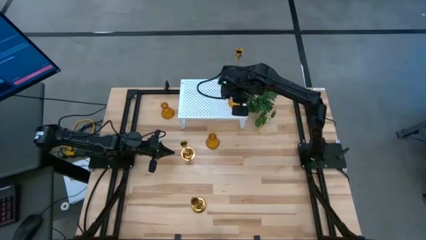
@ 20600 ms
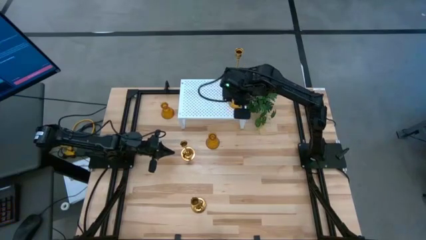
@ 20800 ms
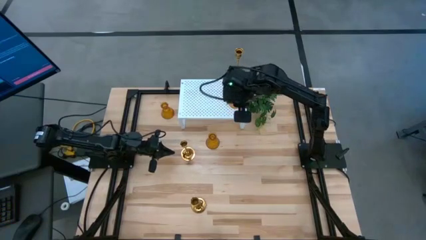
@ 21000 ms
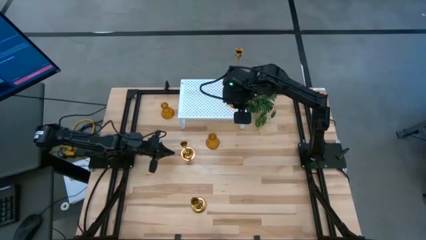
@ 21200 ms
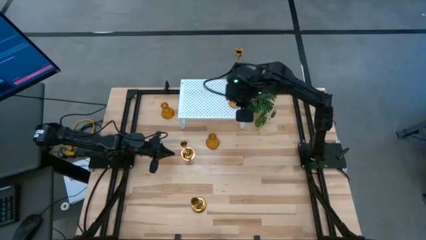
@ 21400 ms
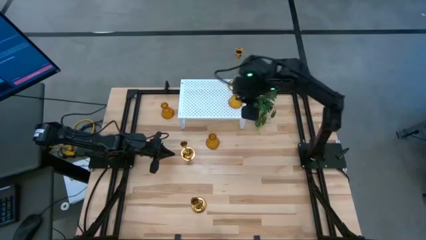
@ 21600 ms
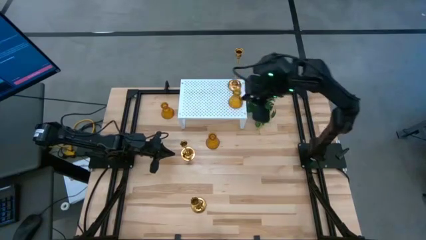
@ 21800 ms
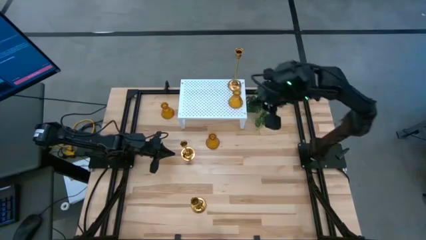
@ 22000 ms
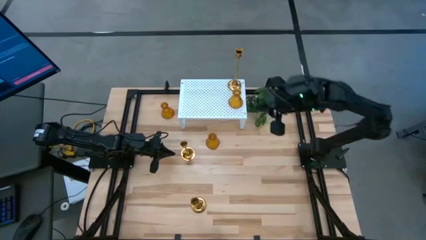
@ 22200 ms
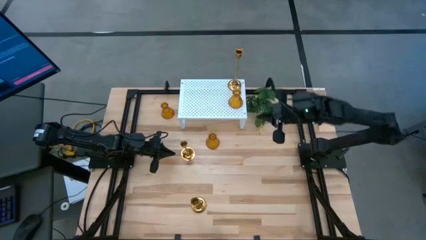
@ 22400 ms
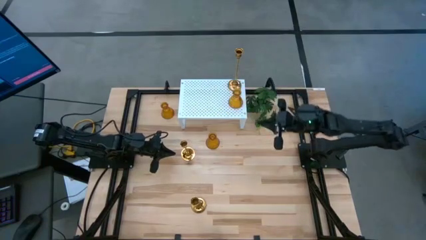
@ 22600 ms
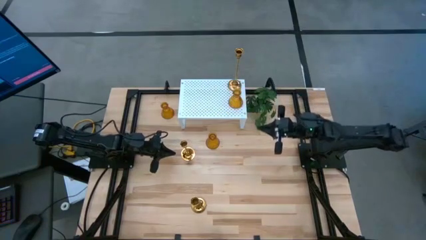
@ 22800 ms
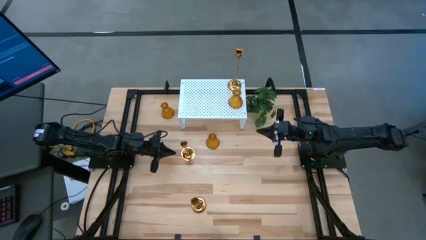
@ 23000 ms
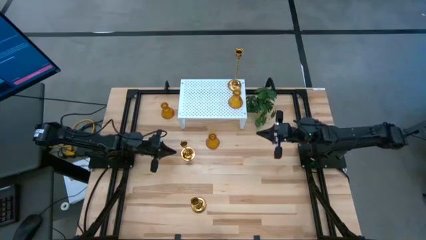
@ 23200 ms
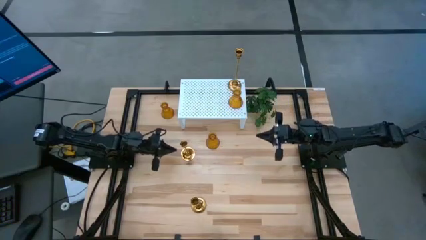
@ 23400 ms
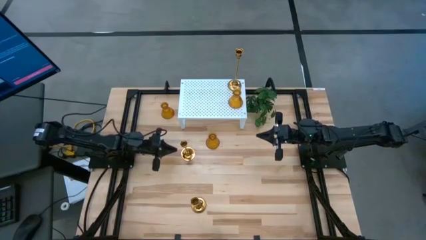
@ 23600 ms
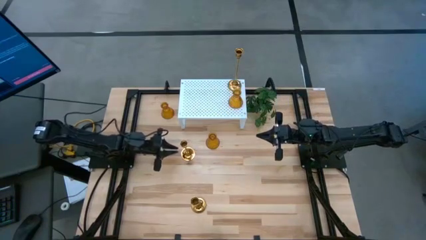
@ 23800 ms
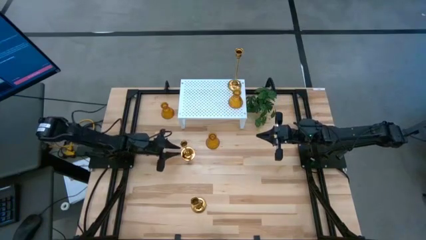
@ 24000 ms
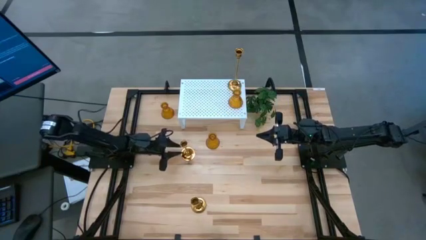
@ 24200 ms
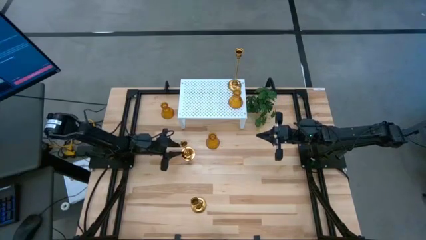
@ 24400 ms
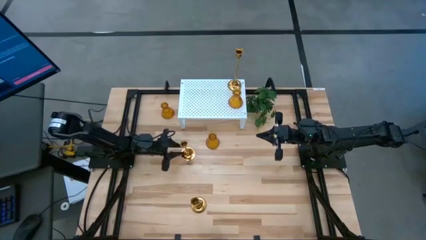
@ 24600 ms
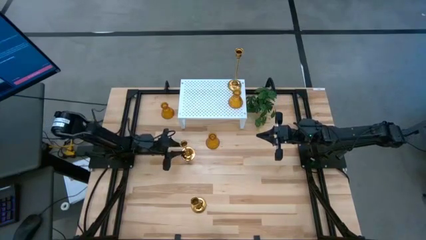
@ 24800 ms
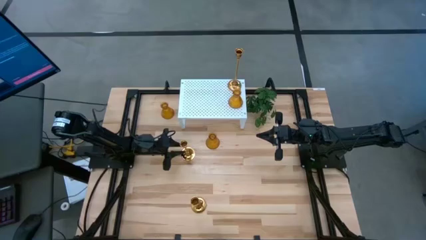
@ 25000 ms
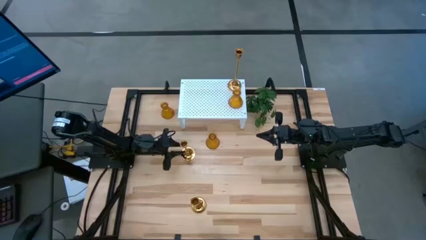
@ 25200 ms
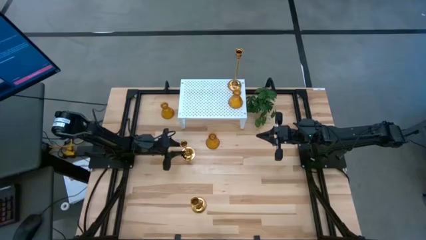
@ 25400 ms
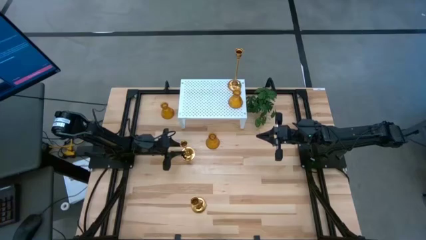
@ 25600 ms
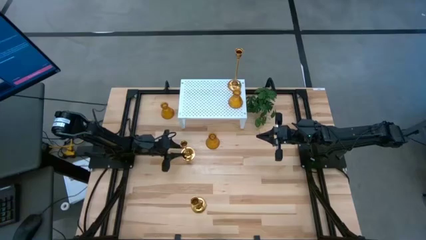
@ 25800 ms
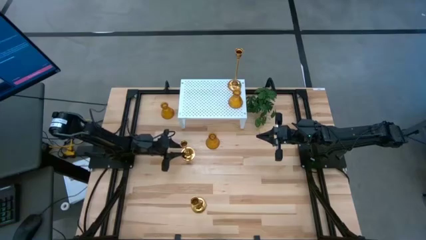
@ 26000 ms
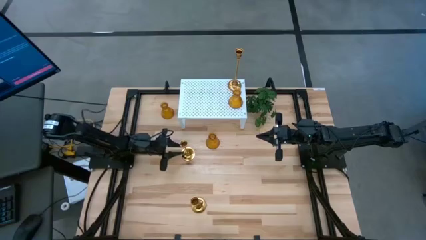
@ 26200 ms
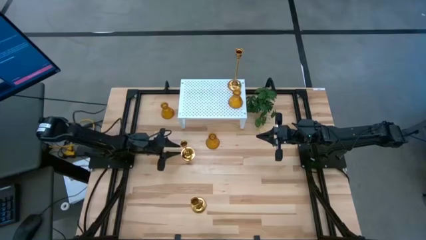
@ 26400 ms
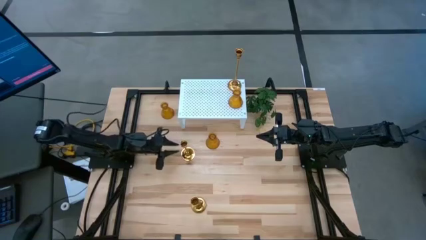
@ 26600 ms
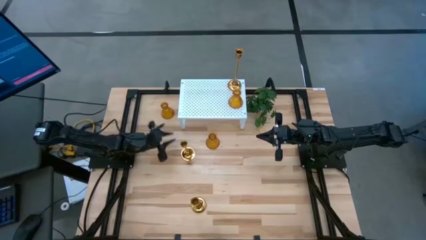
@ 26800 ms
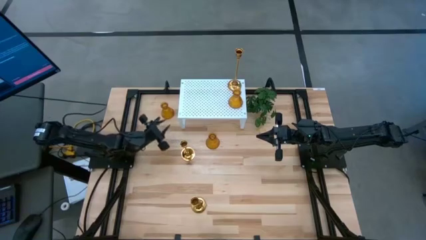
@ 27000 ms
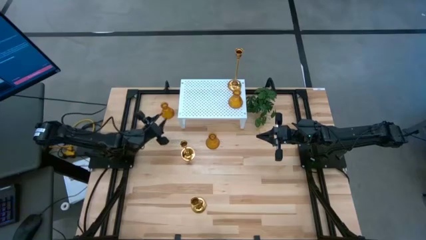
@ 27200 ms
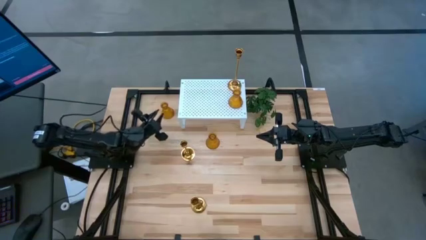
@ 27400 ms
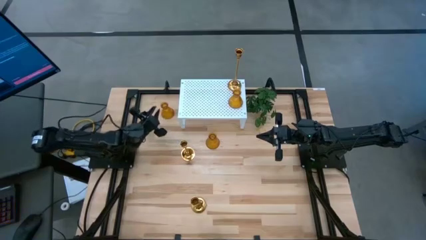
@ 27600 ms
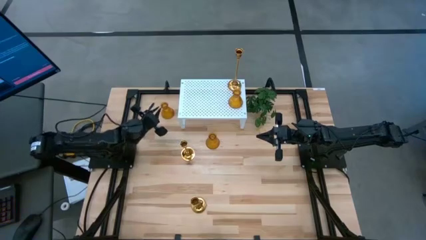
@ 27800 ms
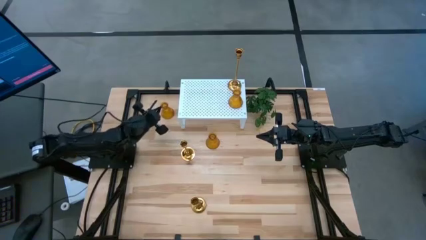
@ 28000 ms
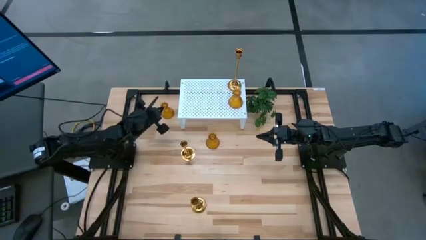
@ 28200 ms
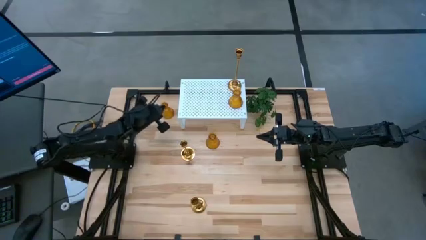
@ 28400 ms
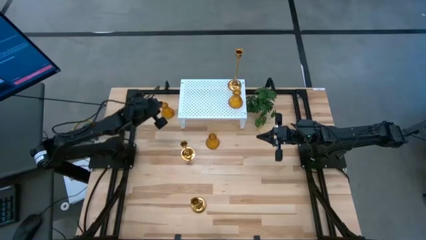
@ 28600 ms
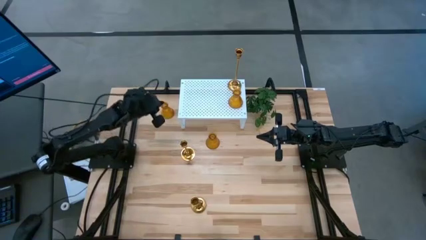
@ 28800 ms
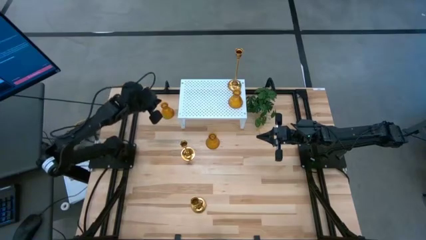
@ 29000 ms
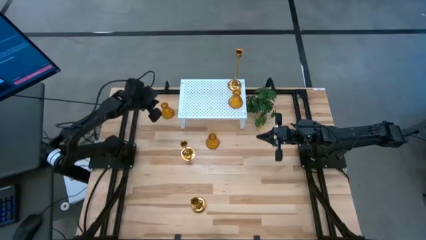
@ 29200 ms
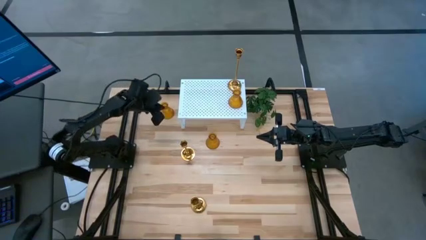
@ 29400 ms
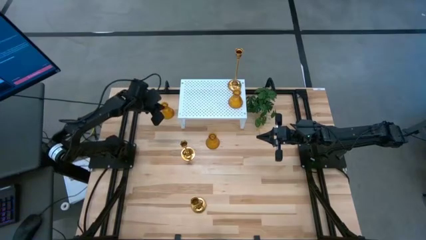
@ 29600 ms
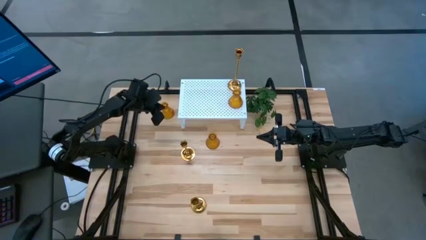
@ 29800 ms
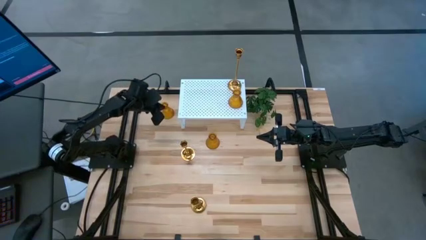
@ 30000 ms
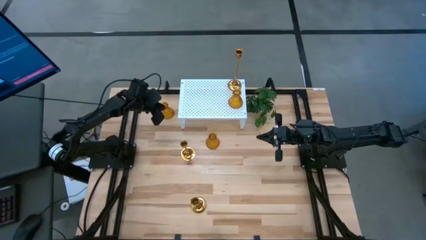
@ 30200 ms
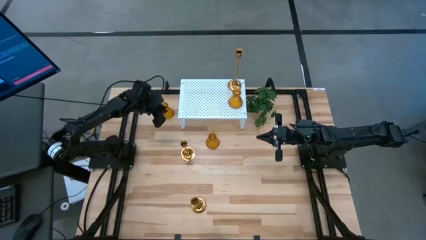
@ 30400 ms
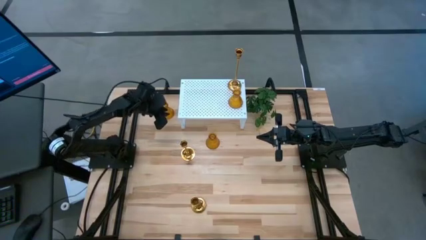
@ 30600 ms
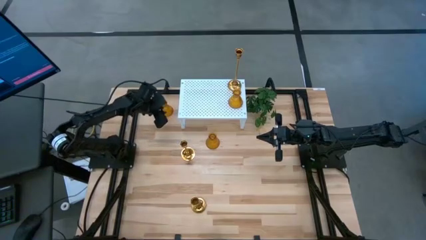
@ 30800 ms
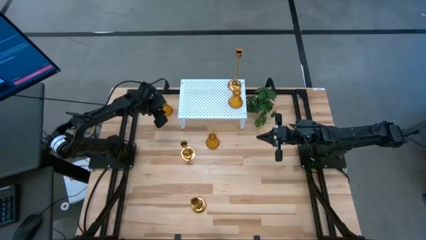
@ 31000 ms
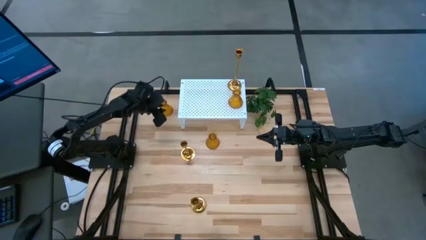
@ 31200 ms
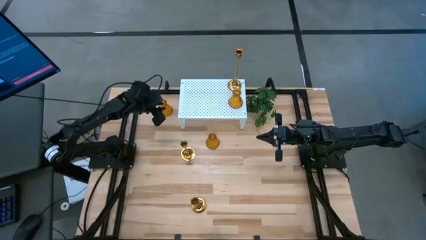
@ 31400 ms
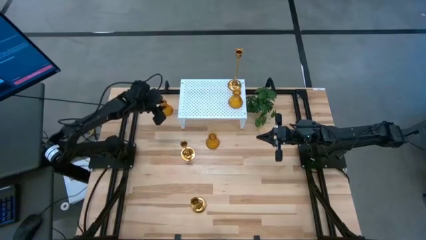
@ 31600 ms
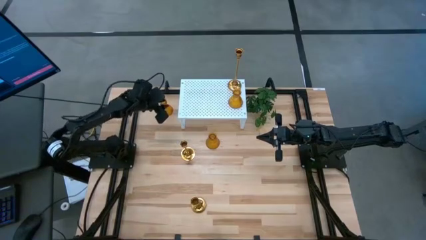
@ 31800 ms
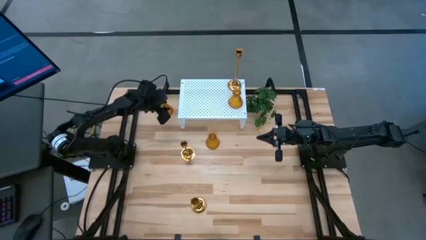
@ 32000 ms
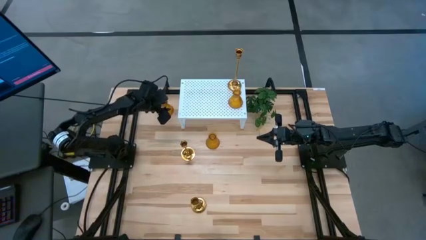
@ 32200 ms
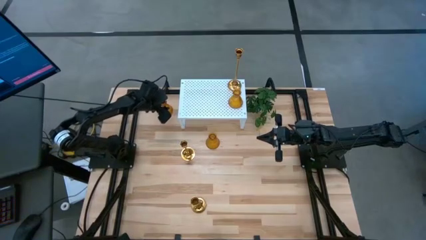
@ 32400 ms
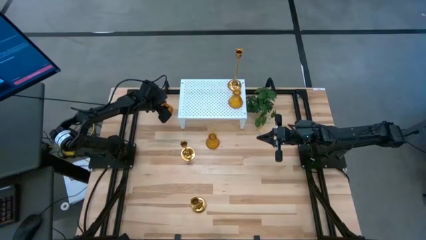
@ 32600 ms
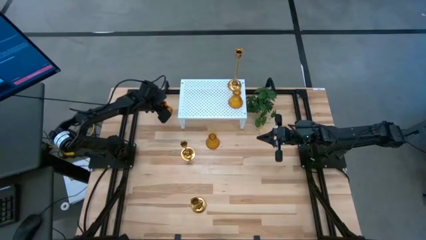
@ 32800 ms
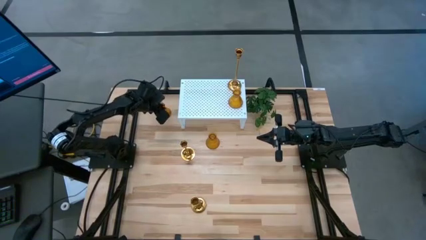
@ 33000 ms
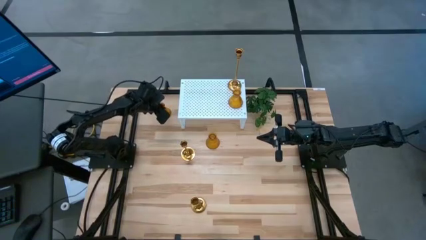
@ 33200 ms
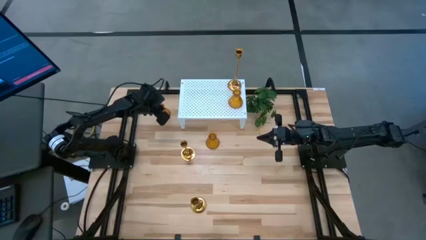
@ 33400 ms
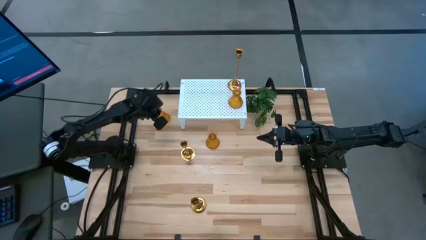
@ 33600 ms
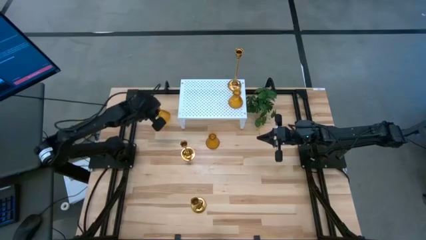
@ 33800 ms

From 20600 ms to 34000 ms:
Task: Pick & Place candle stick holders
Put the top gold vase on the shelf
